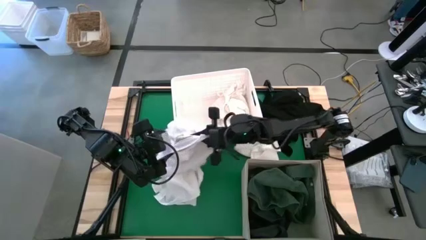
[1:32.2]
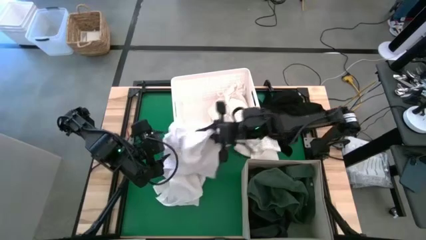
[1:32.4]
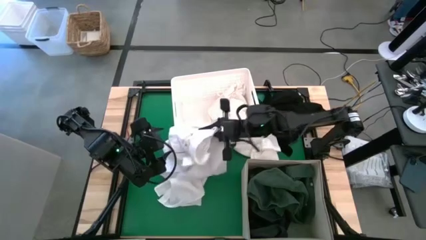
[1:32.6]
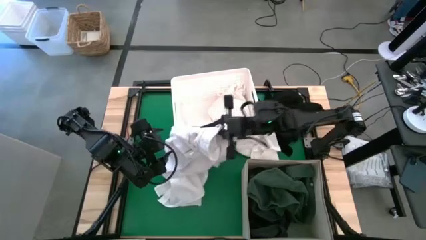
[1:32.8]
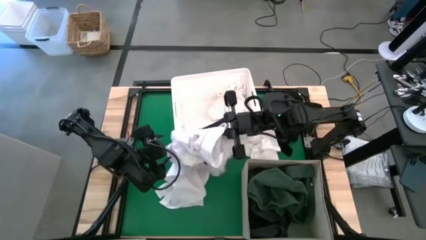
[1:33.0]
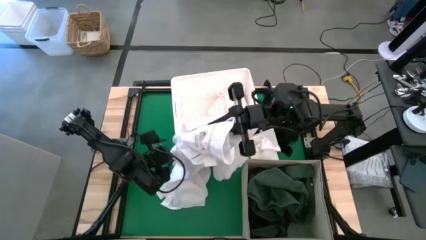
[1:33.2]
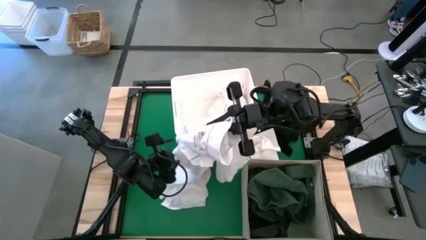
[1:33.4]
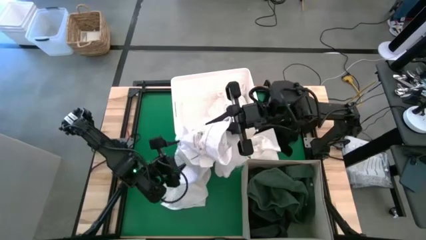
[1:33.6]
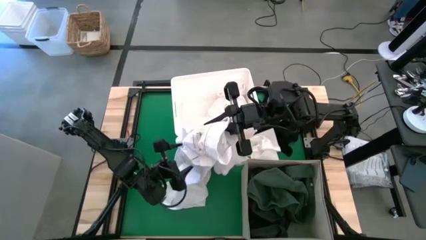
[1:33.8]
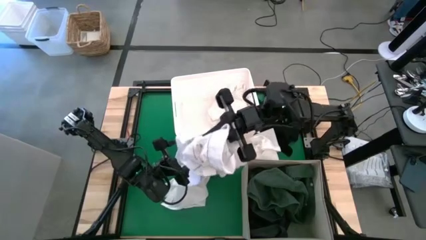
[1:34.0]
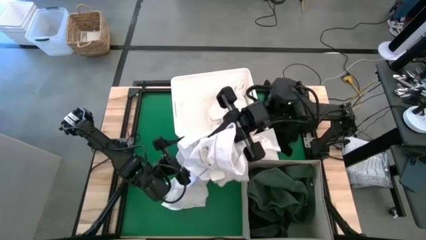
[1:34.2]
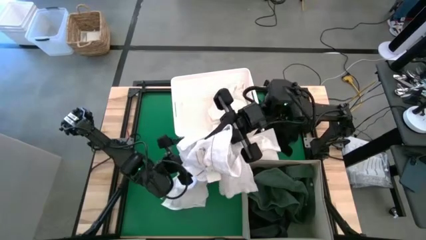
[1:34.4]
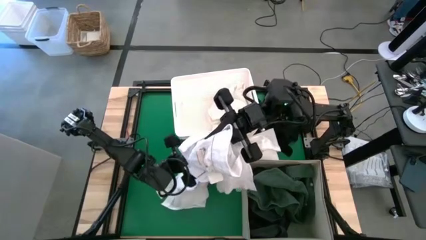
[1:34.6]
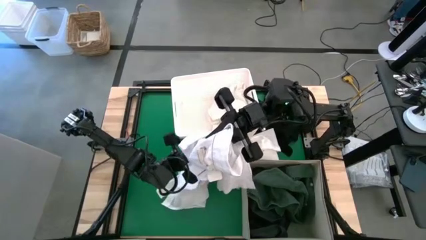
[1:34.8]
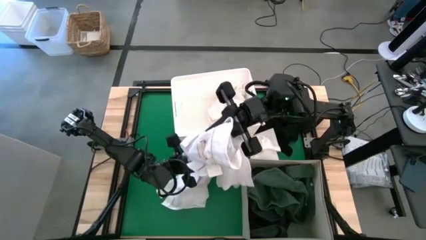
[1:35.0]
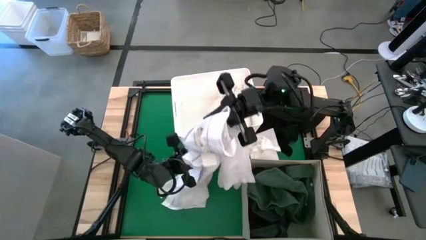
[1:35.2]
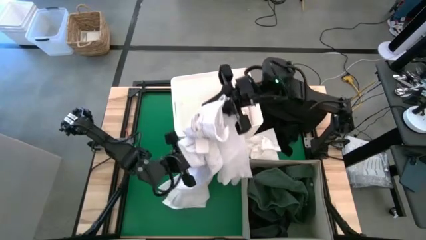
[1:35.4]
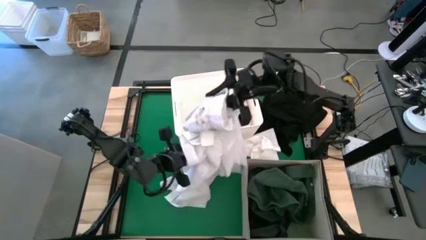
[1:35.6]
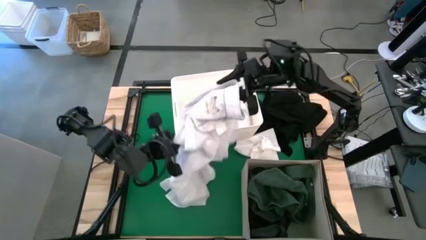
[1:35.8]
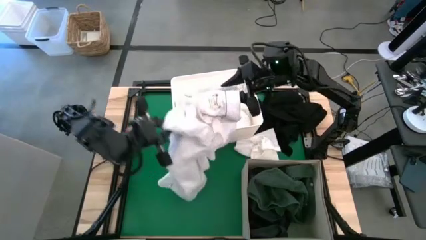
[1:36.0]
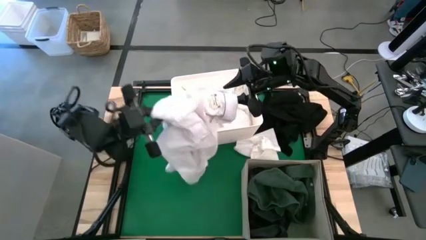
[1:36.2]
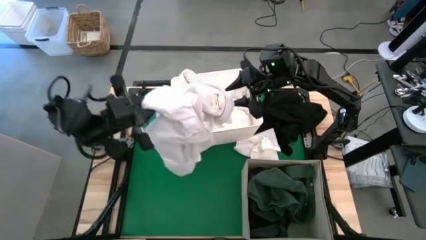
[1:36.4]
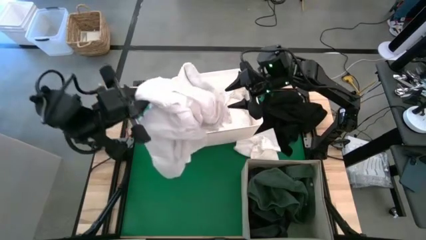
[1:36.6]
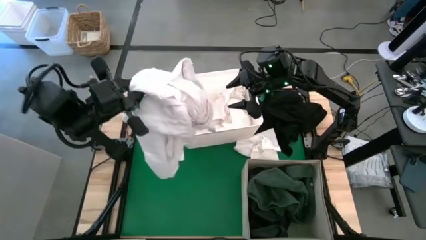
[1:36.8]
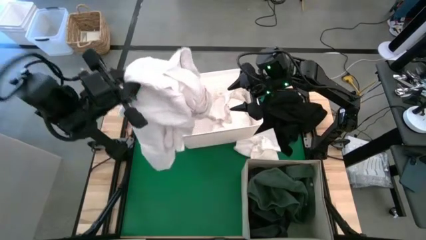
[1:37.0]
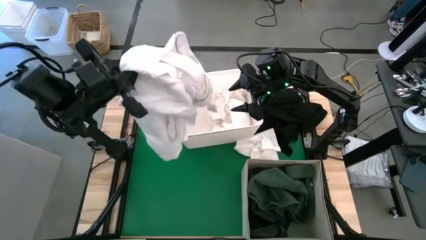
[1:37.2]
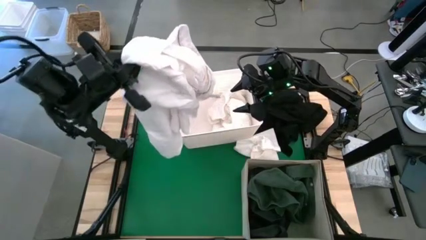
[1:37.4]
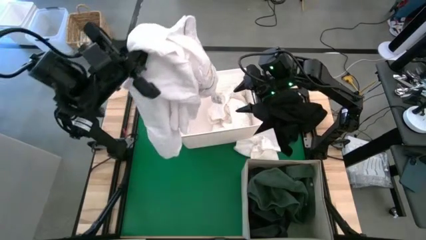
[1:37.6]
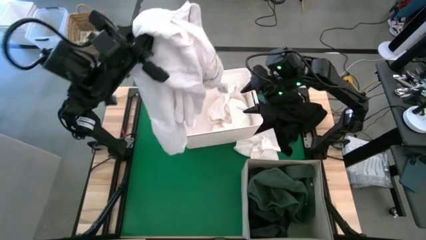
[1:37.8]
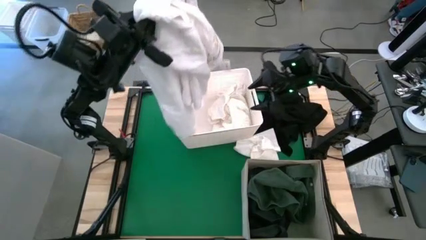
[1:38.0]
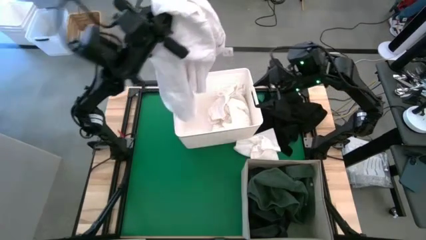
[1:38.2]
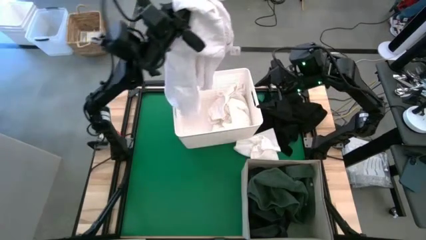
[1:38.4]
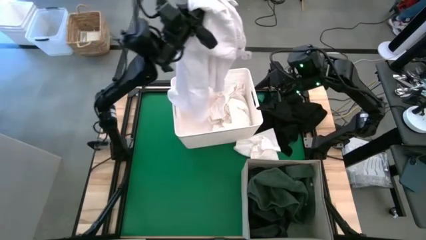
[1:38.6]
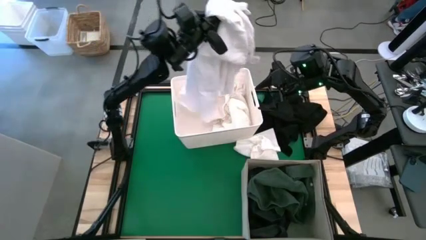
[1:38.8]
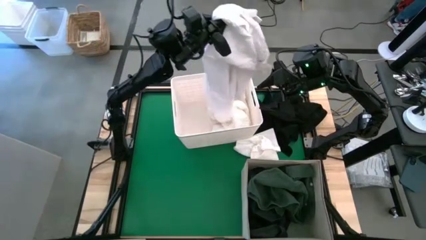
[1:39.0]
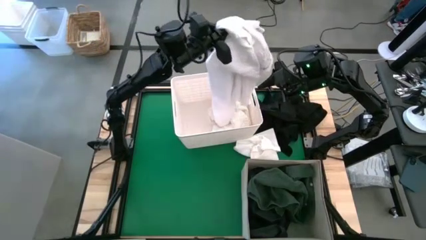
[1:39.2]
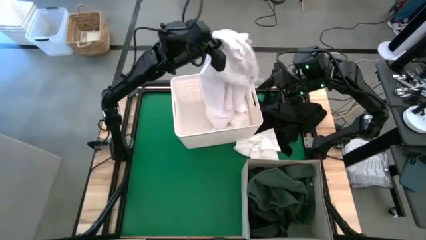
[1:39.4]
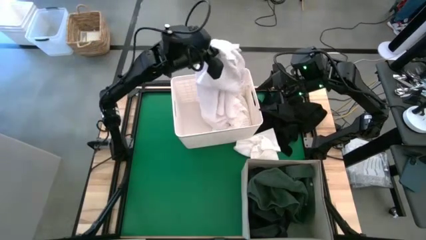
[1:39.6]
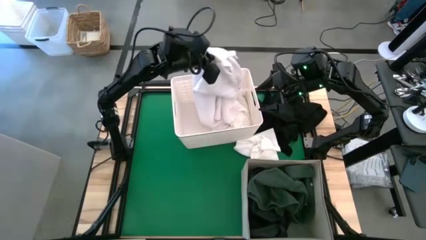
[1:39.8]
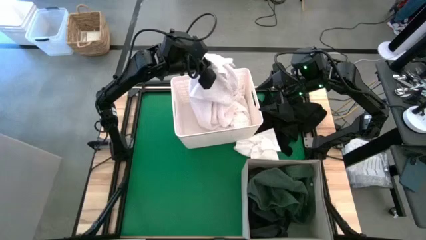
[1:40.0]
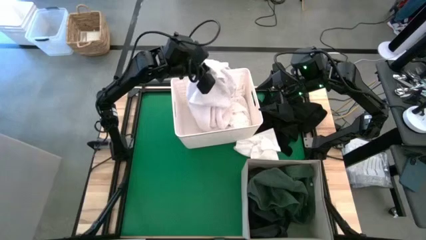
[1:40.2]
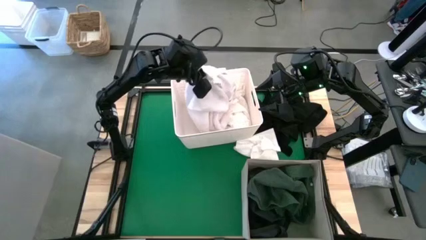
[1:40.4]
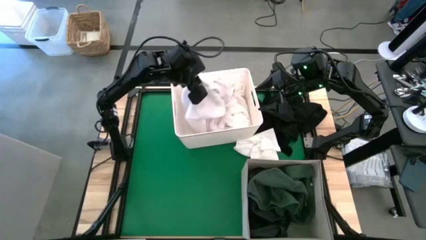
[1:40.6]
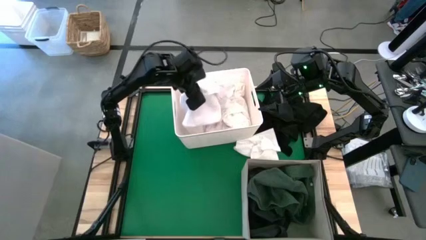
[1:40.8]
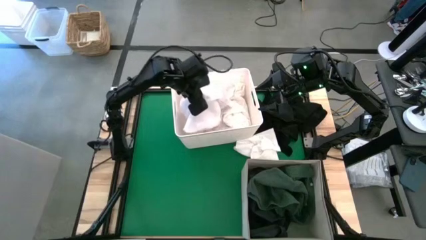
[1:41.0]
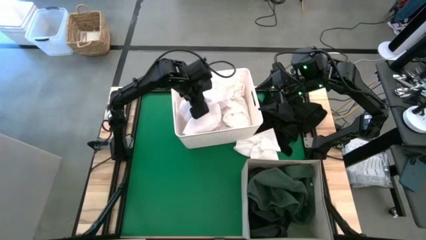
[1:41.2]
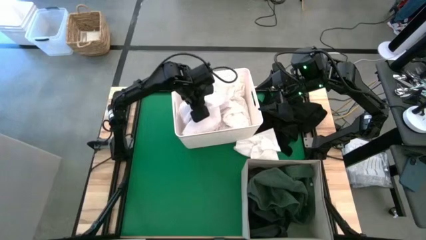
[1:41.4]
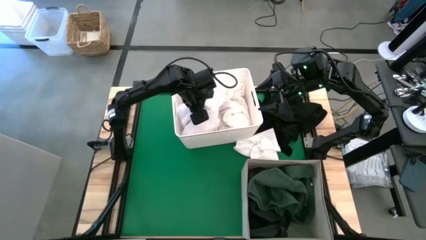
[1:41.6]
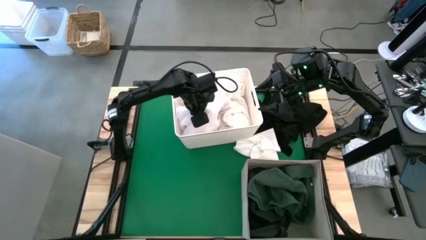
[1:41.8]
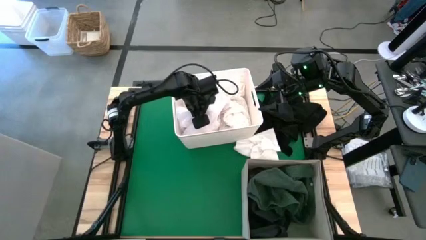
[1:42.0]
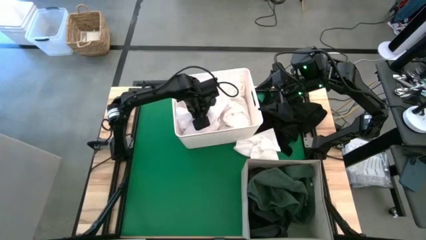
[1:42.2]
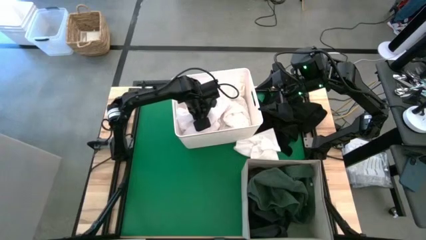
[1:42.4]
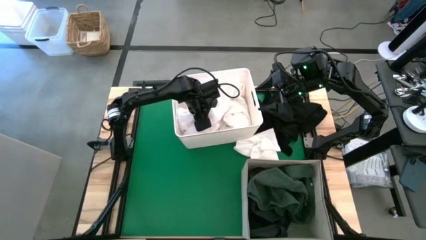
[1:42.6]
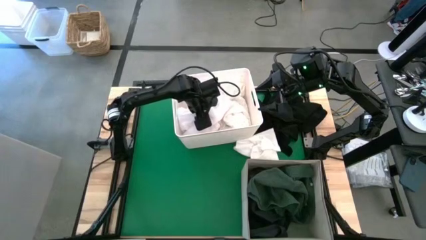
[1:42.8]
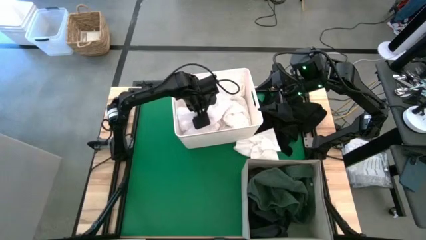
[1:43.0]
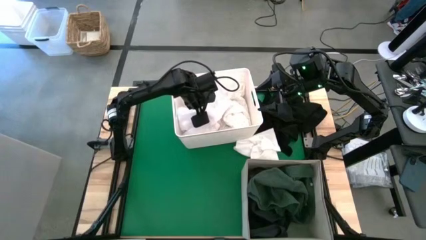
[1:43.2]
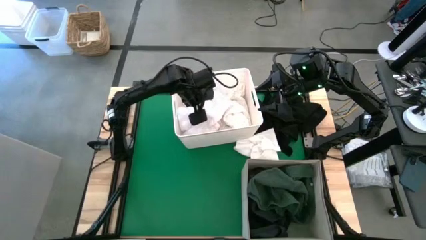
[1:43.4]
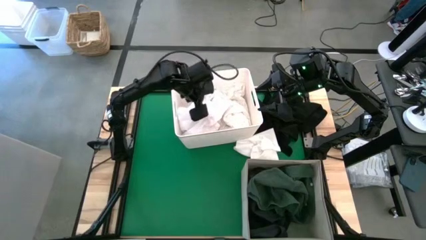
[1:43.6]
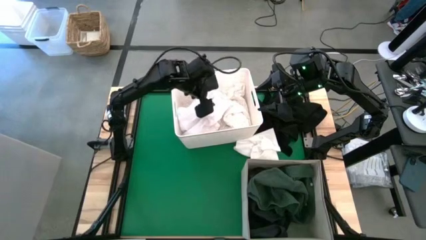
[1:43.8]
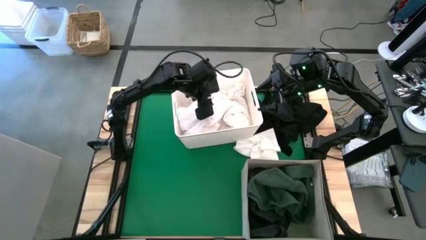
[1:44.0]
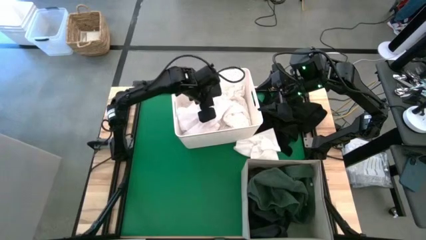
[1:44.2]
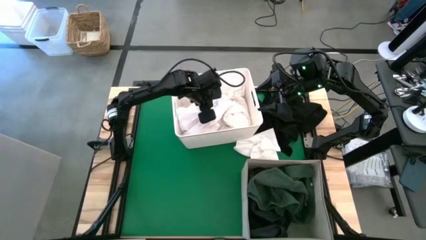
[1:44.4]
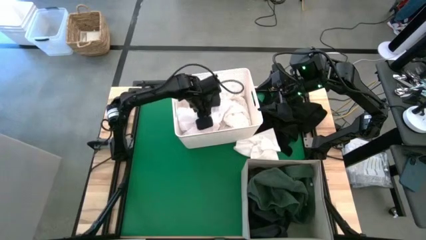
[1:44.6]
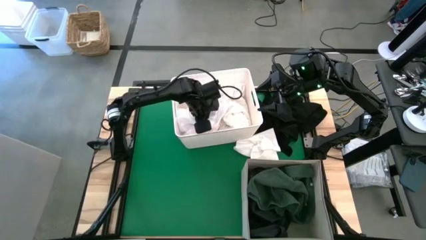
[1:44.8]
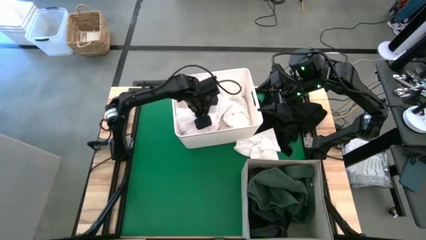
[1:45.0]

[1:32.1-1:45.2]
Put the left white cloth into the white plastic storage bin
